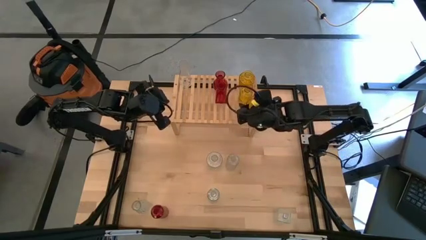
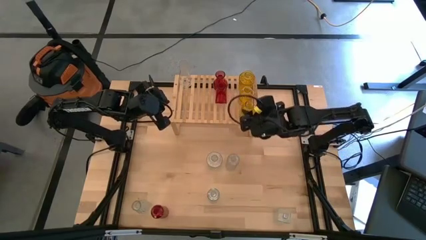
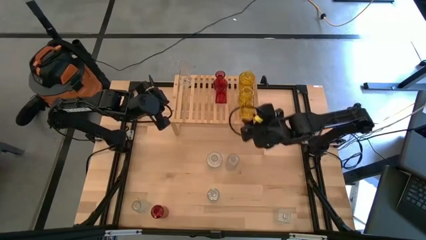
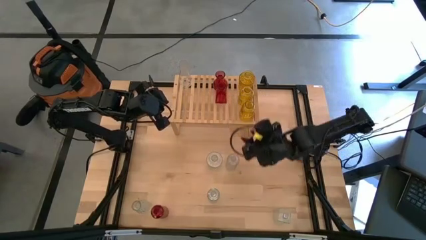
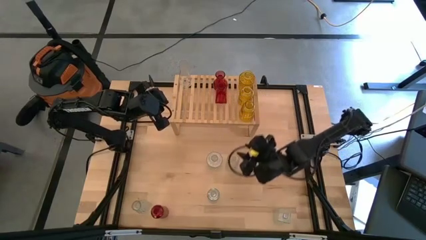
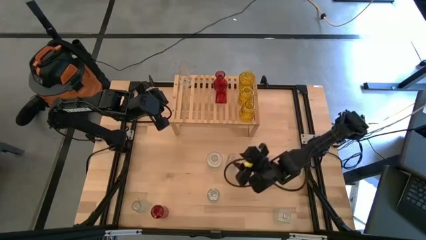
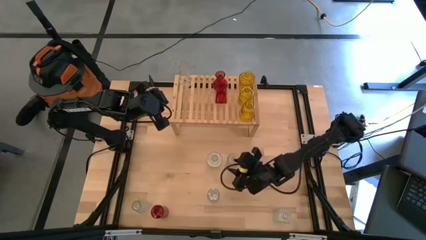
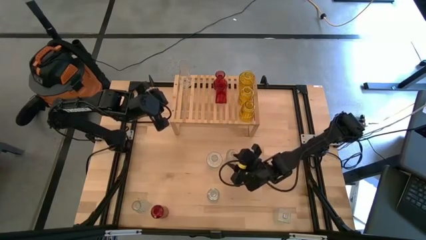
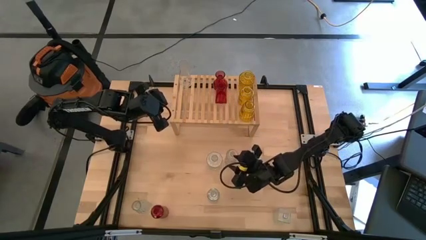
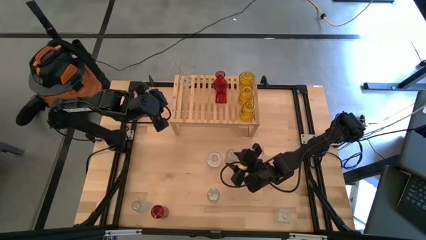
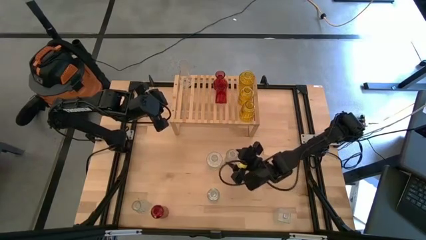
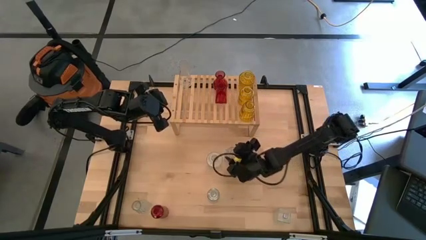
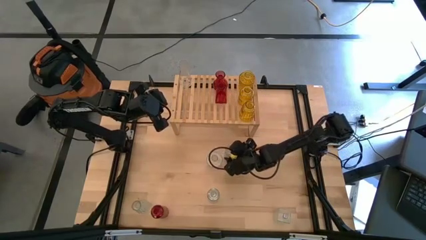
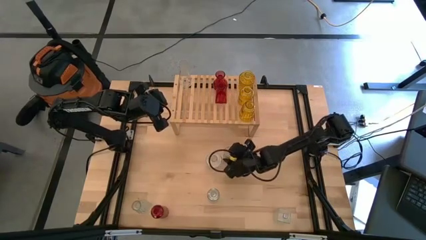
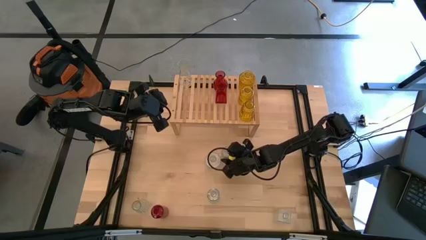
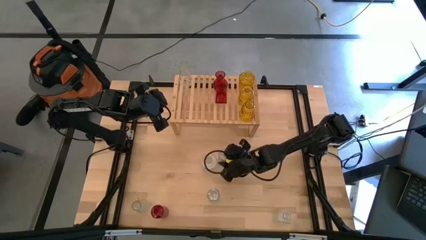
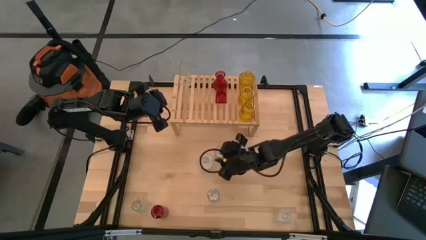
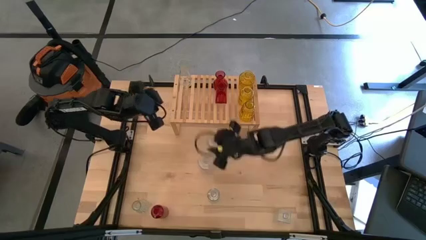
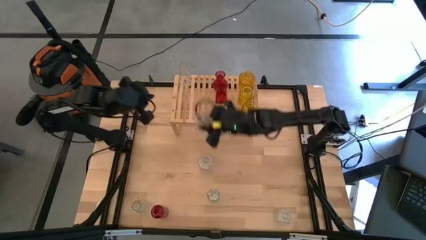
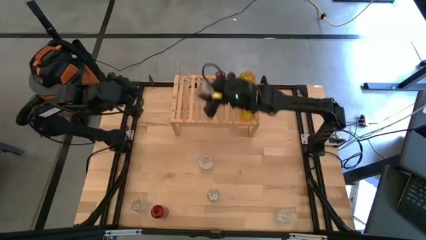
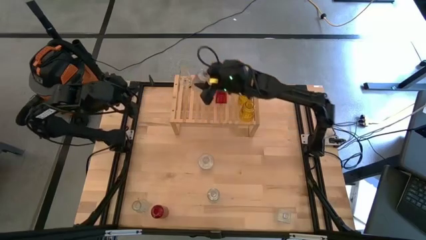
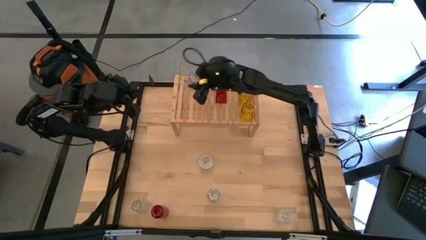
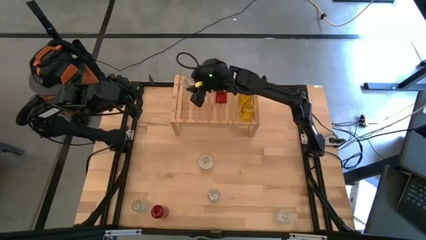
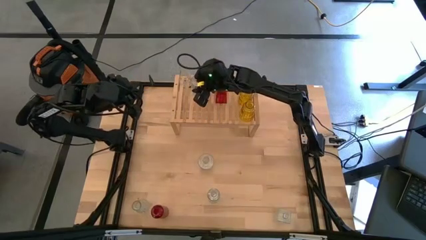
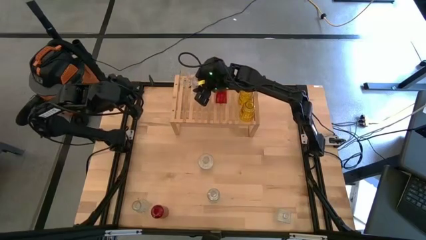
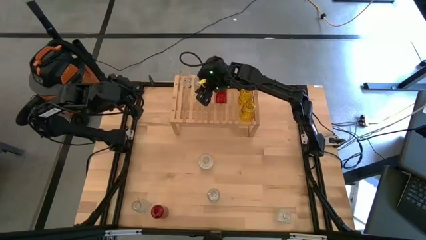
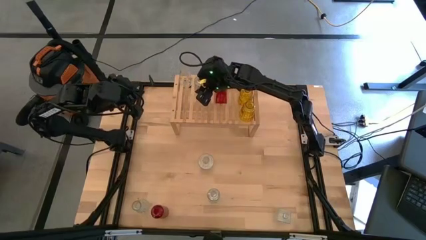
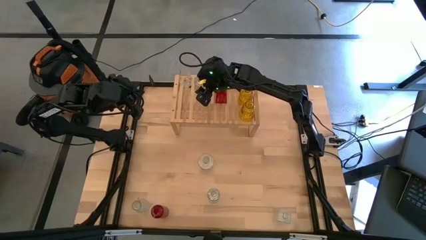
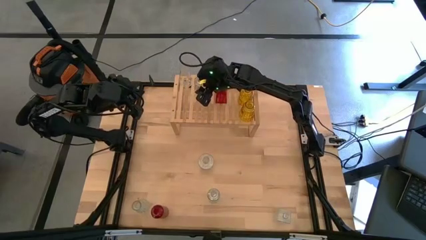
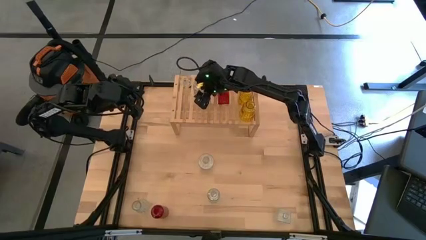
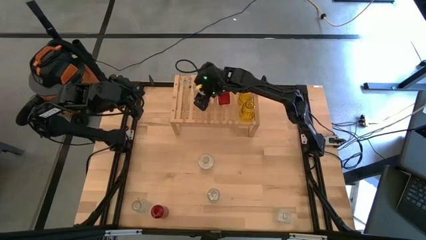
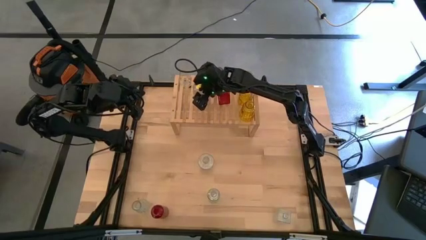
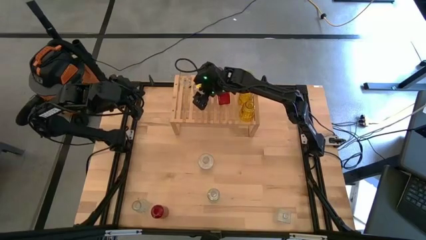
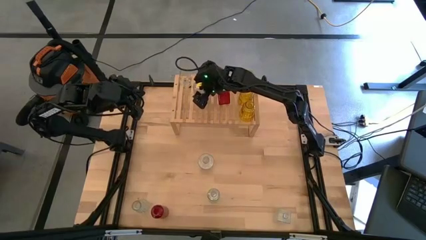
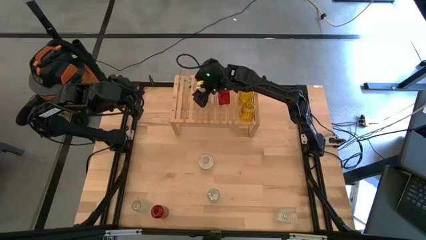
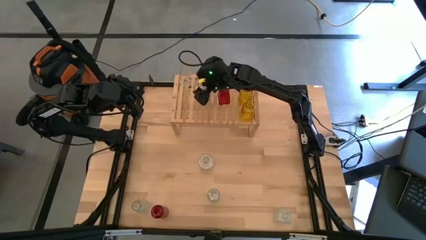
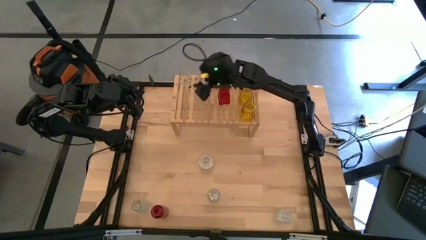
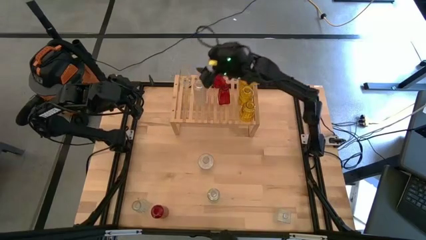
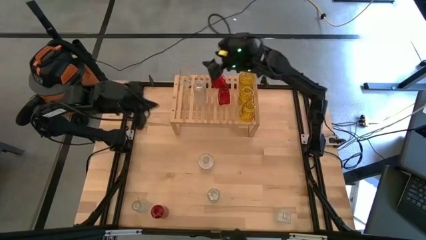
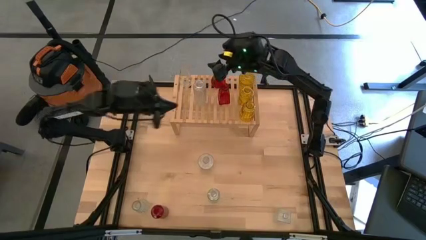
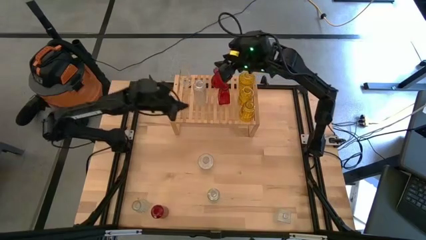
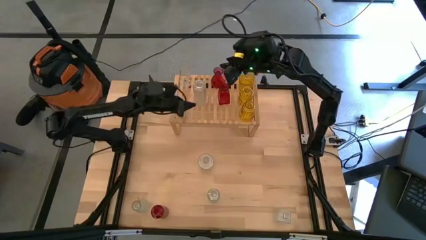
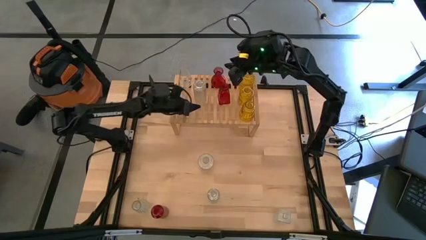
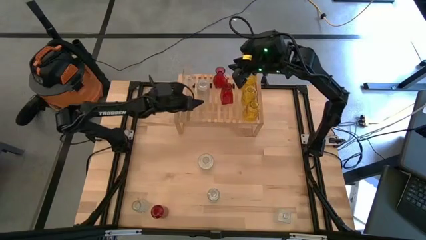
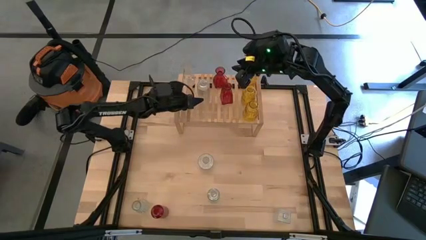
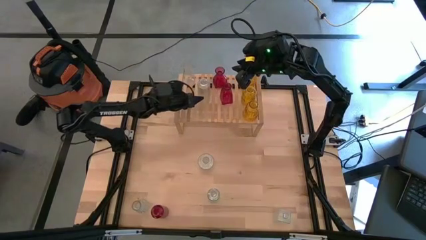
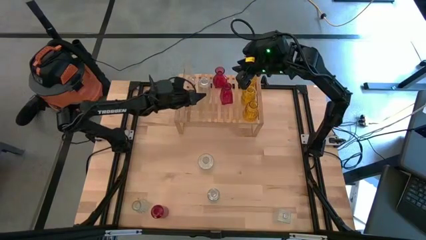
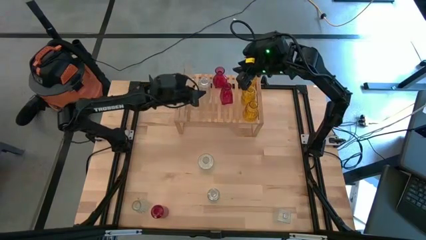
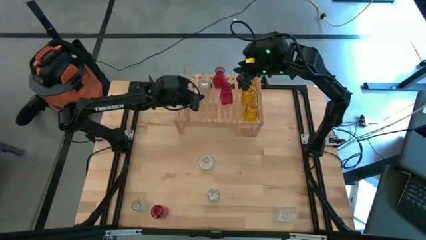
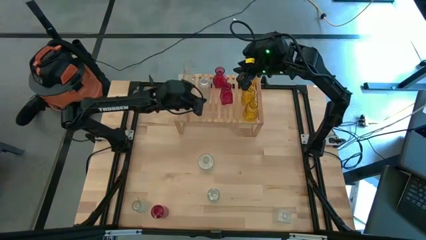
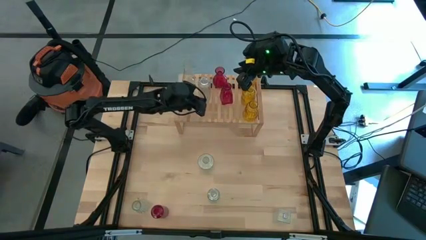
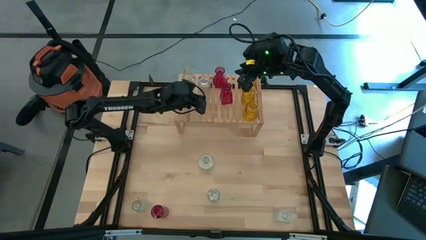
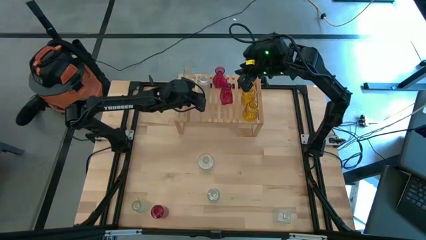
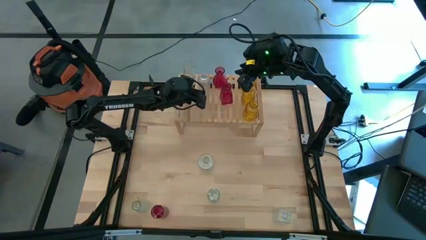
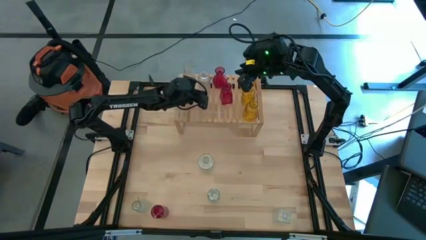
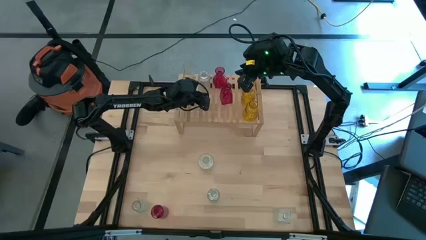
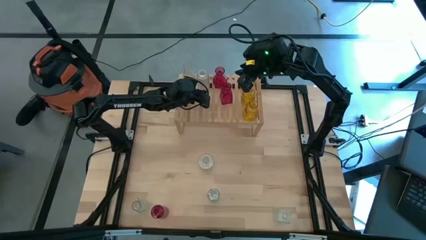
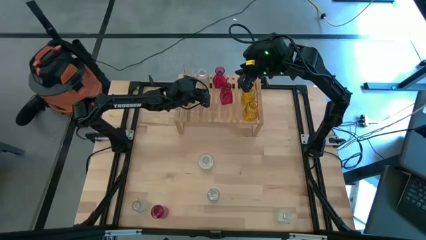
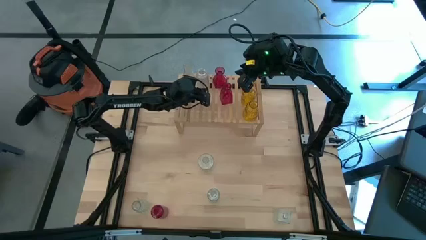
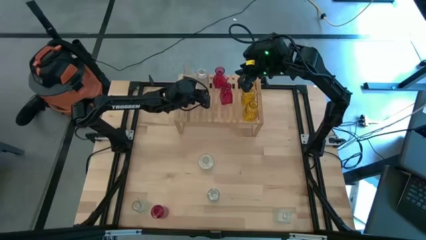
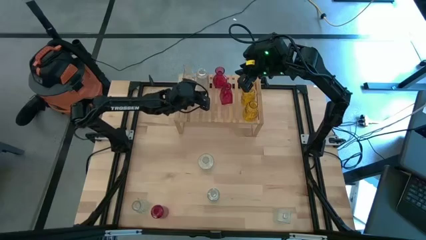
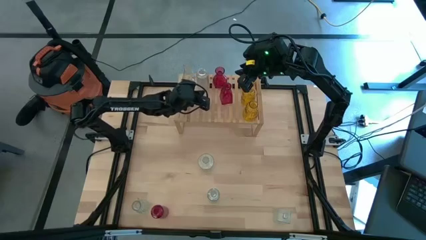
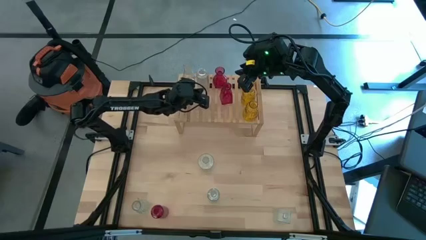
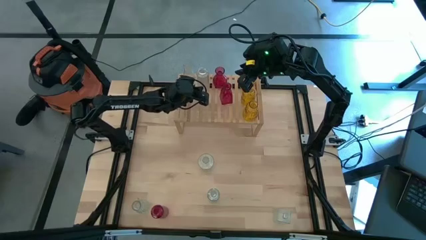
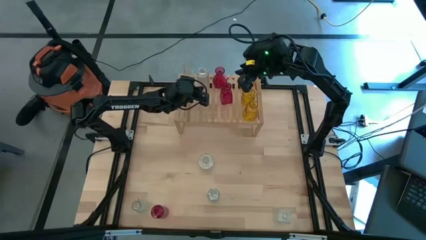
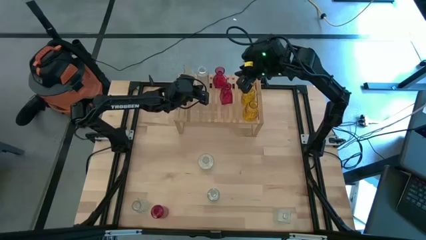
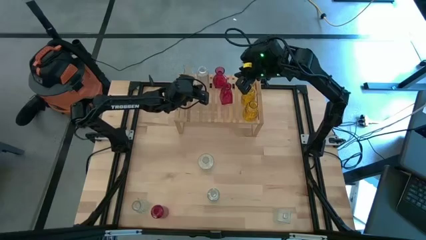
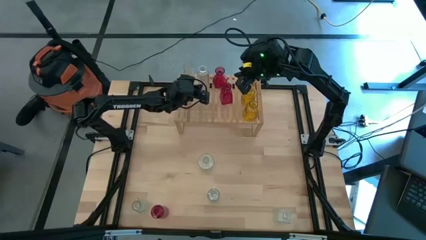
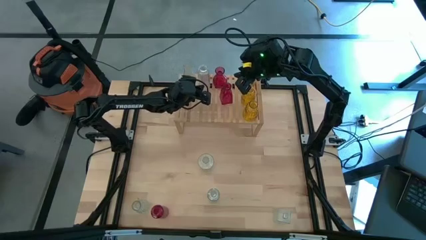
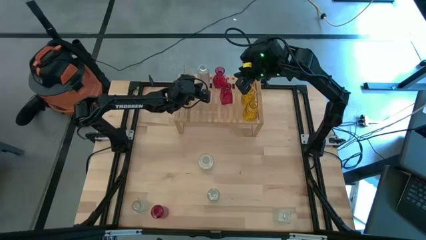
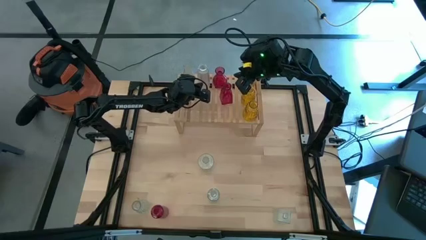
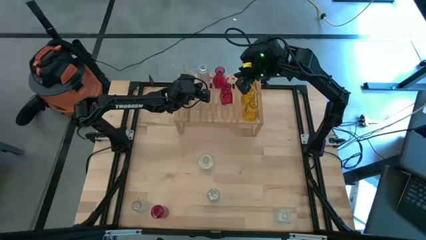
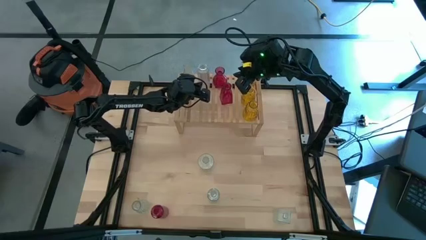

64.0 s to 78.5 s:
Task: sort vases onto shelf
Put the transparent vase on the shelf

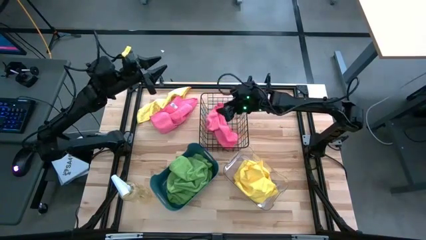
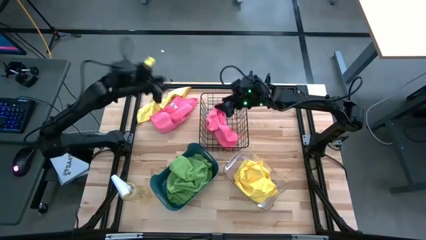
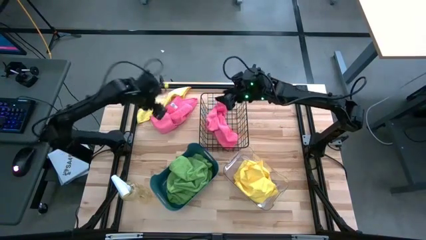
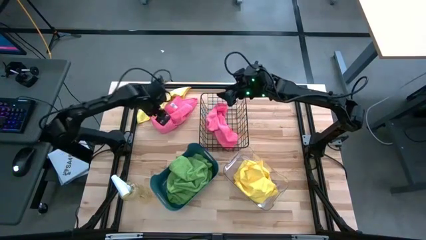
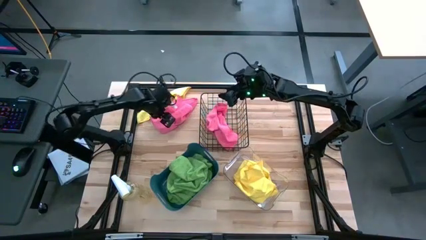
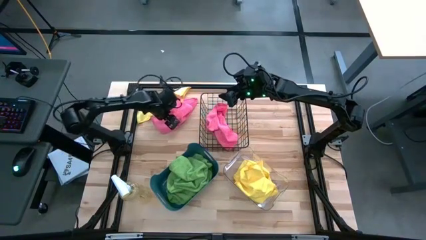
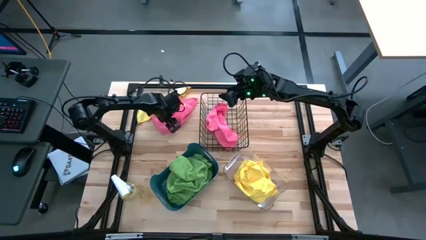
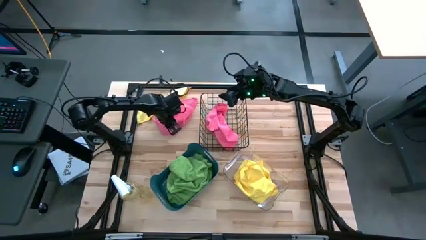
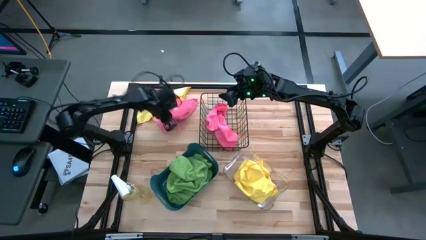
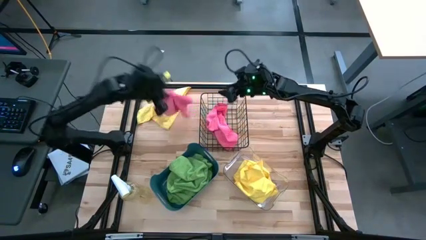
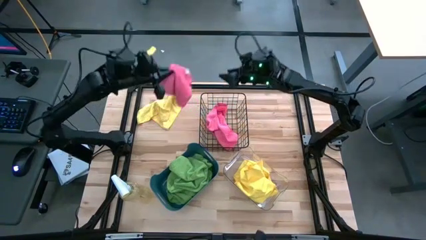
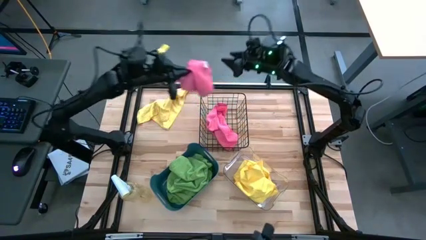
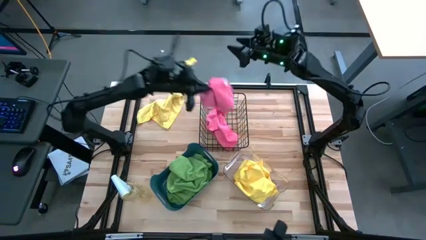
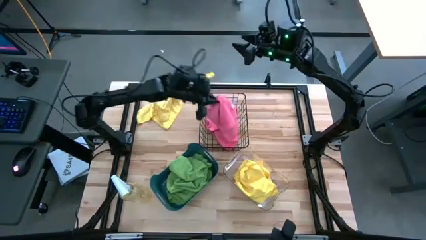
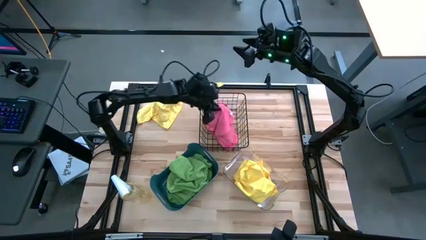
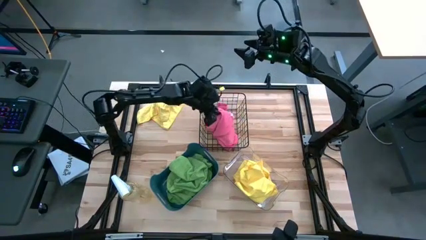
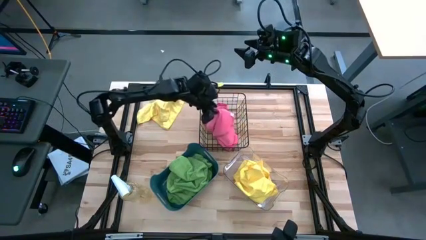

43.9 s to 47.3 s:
Task: Sort microfiber towel by color & place in baskets
Put the pink towel into the mesh organizer
